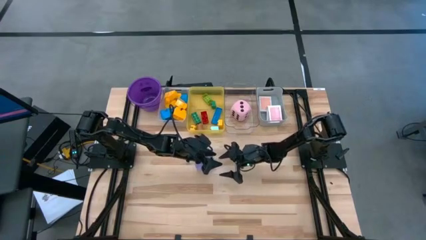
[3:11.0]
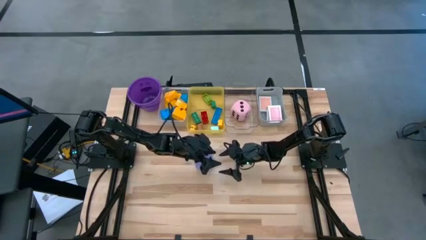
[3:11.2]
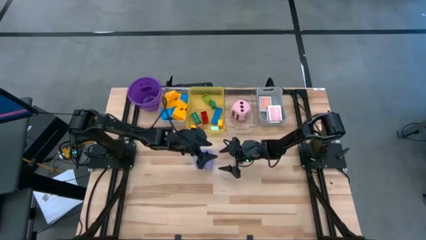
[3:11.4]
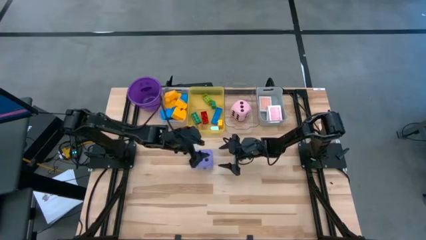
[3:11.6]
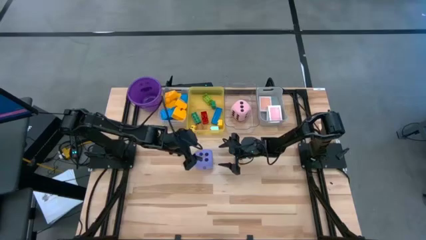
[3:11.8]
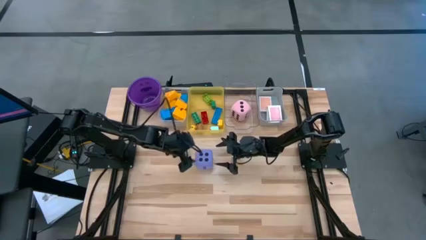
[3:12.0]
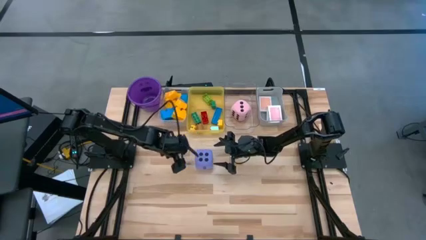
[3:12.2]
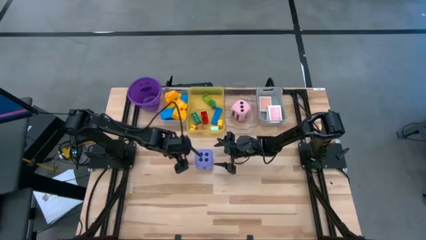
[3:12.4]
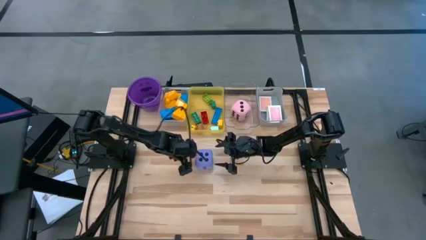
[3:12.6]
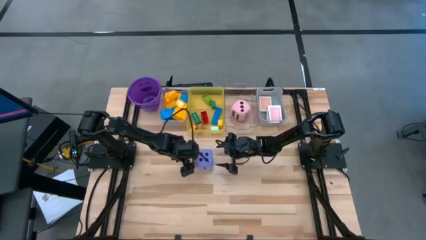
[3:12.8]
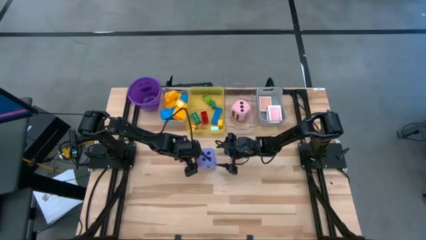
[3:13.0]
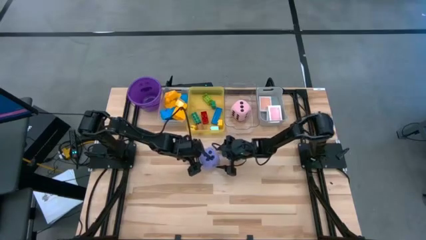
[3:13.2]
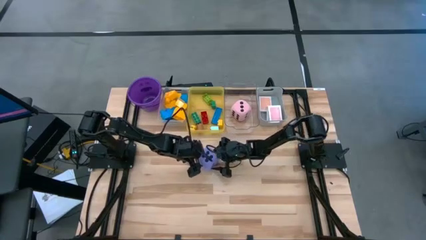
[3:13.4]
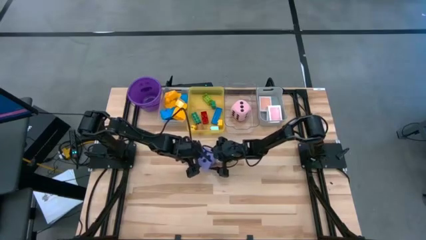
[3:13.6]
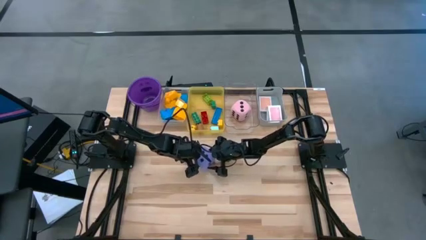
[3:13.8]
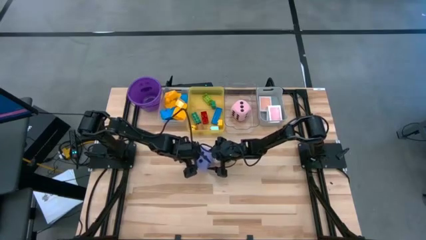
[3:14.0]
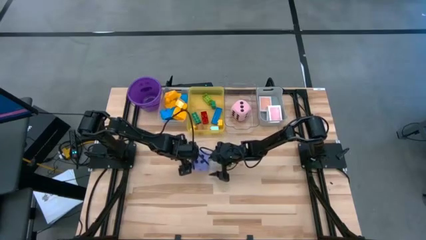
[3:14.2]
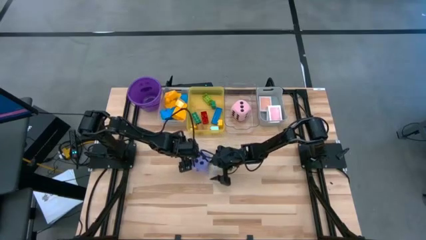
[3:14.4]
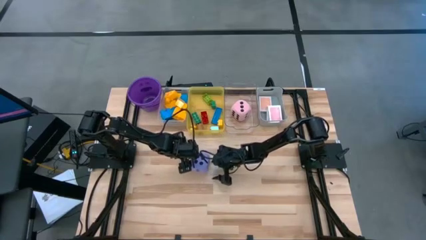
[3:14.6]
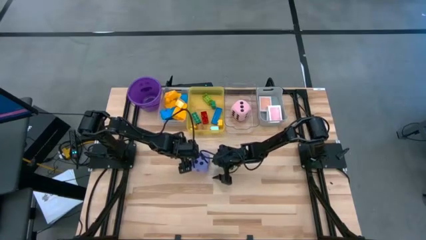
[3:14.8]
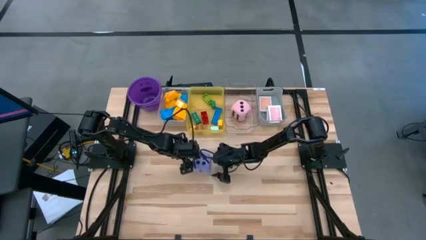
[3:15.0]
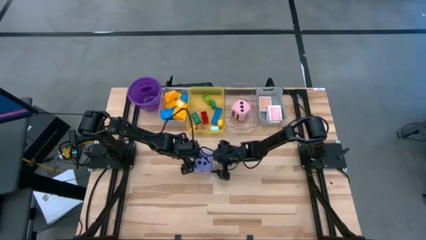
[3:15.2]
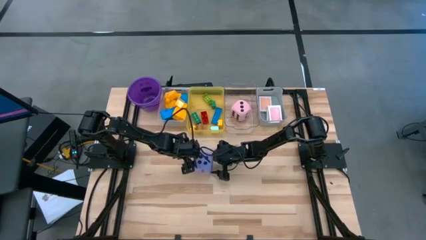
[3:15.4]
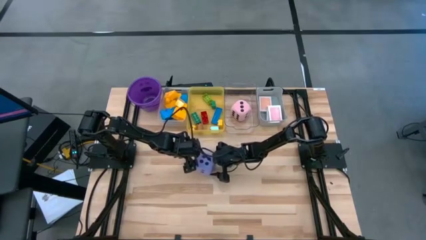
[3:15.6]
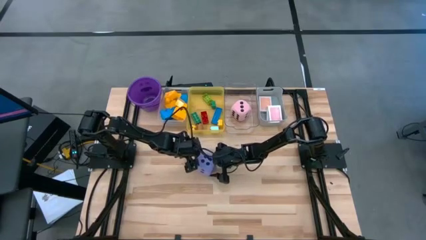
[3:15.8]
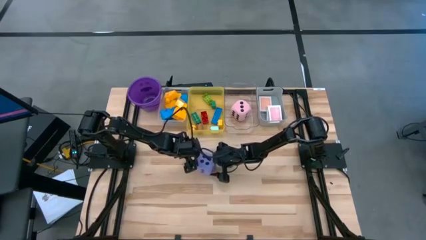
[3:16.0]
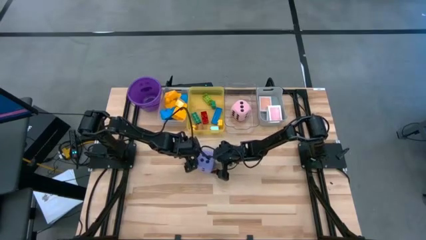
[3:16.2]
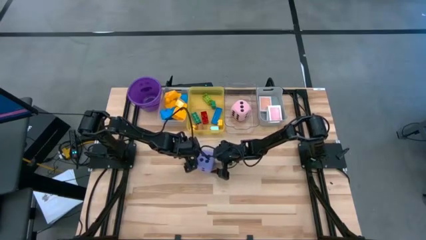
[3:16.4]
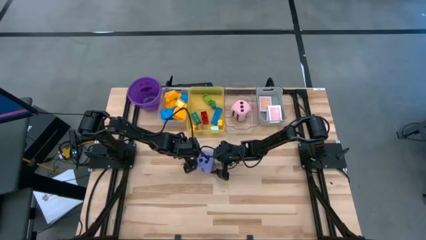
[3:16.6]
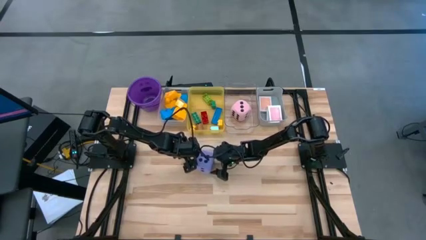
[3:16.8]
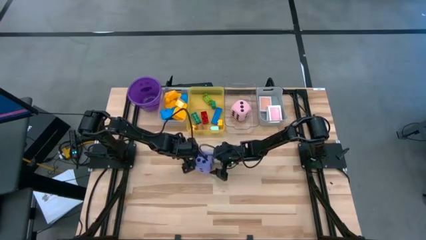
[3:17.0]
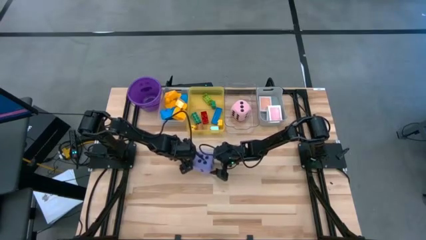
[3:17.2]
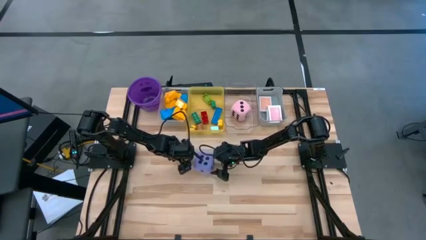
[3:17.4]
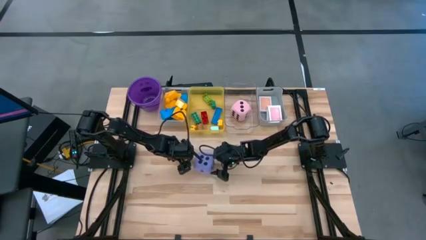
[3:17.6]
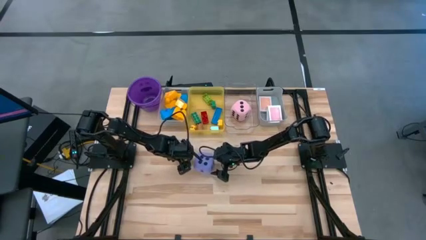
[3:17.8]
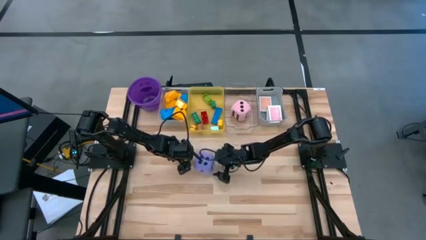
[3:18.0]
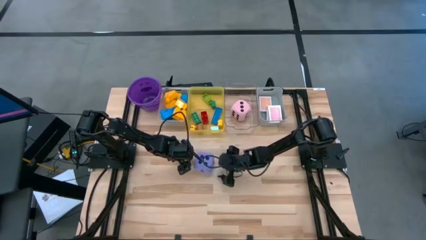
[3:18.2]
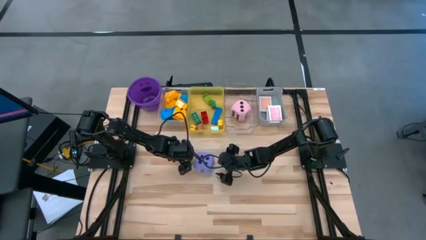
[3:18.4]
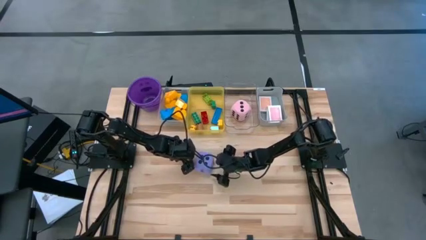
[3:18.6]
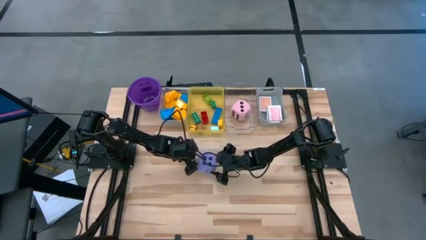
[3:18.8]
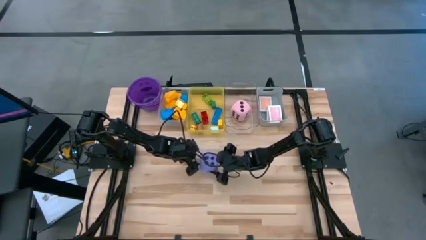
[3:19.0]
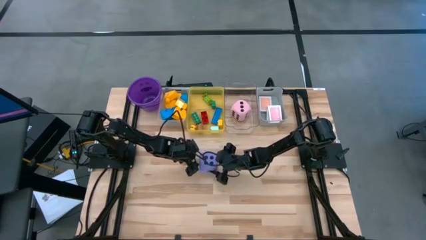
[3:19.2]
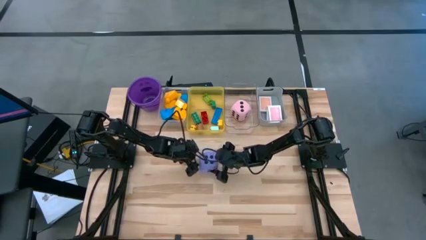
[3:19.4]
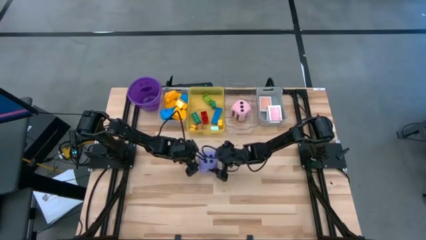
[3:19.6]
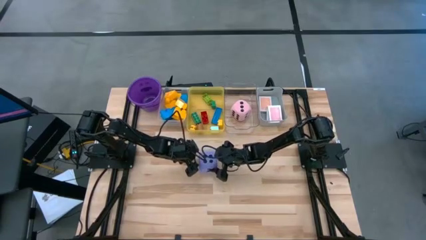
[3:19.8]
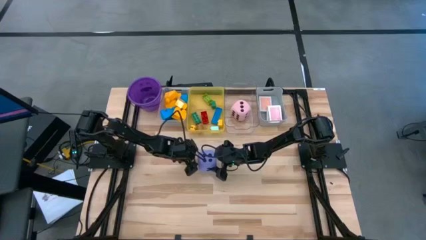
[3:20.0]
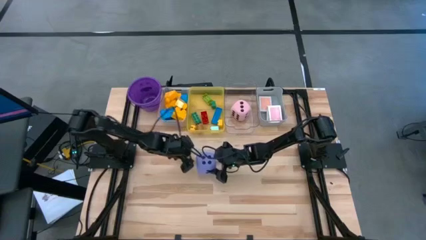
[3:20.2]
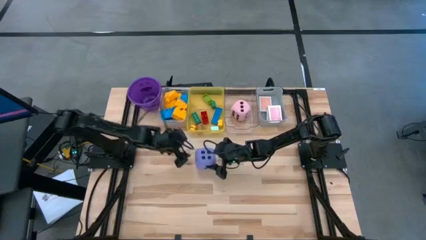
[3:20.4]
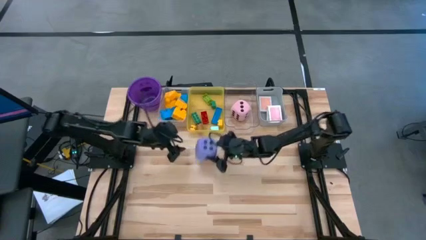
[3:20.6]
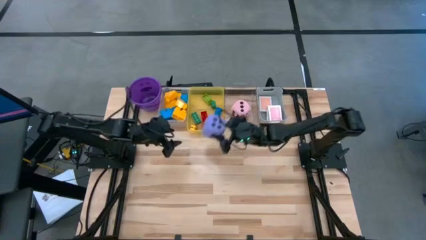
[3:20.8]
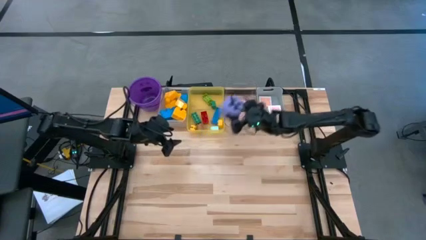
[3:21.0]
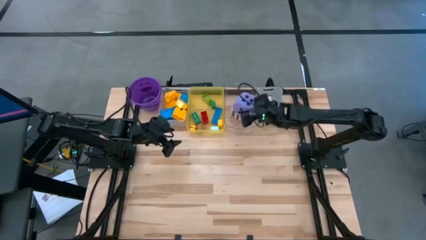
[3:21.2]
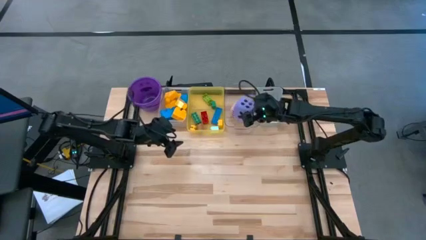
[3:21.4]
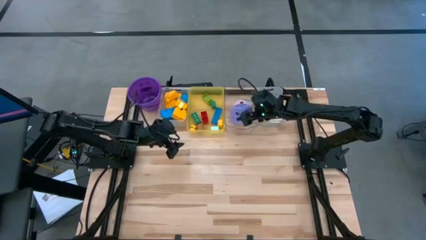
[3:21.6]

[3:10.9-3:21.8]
Task: Pick & Place Toys
Put the purple dice into the right transparent bin

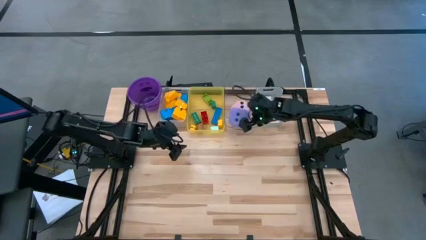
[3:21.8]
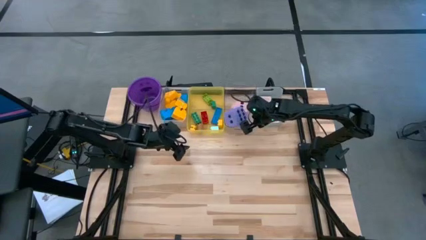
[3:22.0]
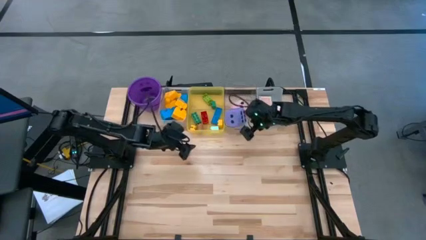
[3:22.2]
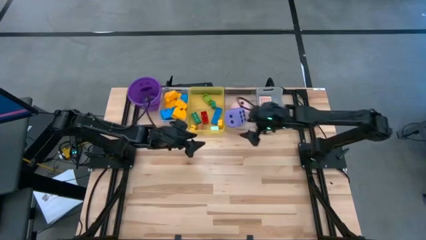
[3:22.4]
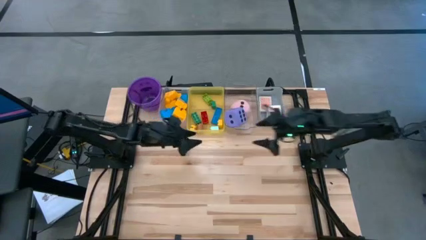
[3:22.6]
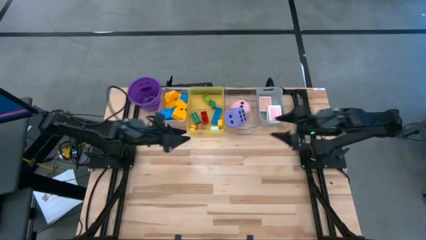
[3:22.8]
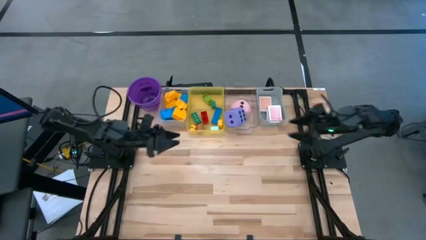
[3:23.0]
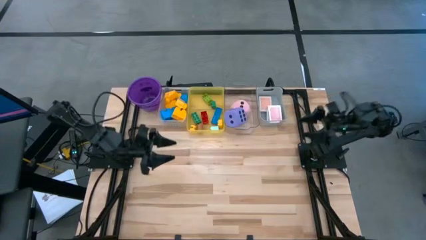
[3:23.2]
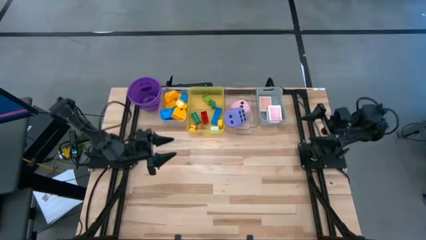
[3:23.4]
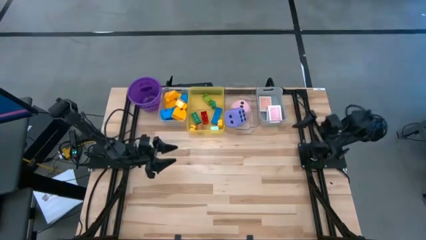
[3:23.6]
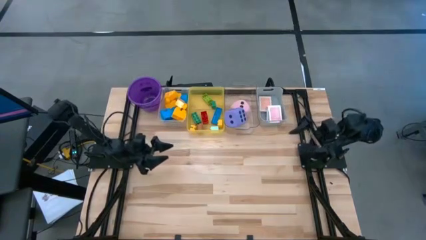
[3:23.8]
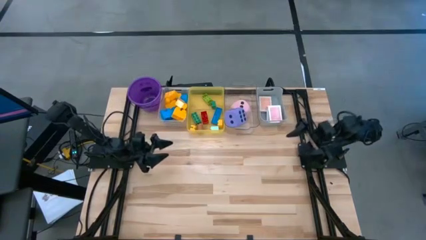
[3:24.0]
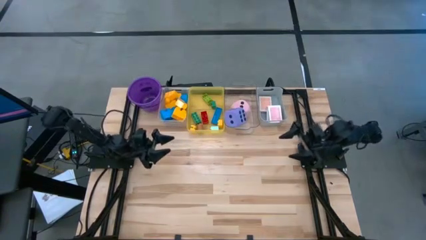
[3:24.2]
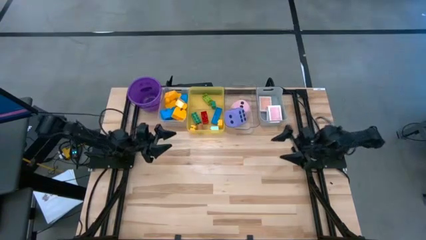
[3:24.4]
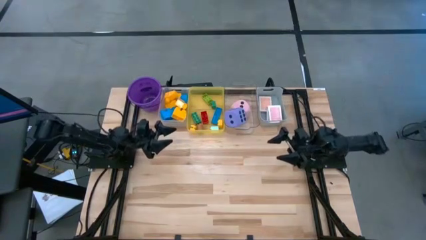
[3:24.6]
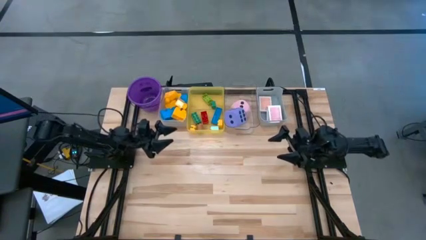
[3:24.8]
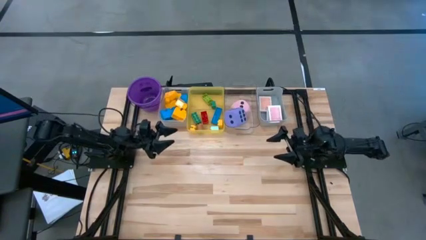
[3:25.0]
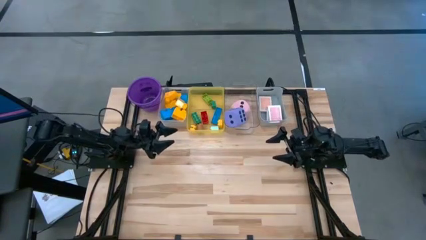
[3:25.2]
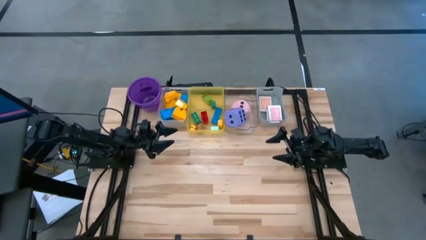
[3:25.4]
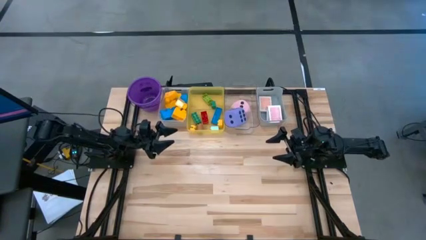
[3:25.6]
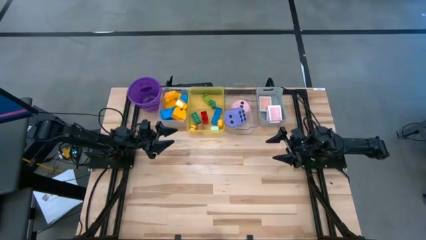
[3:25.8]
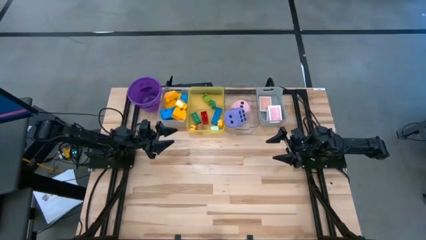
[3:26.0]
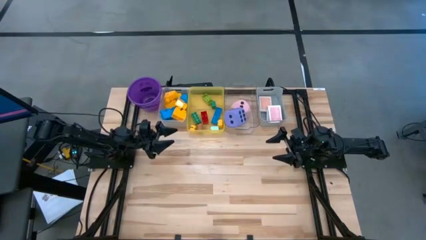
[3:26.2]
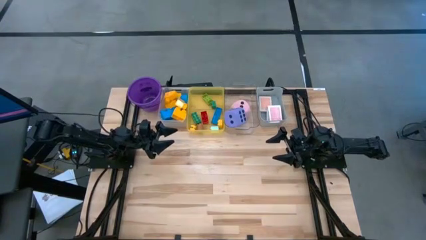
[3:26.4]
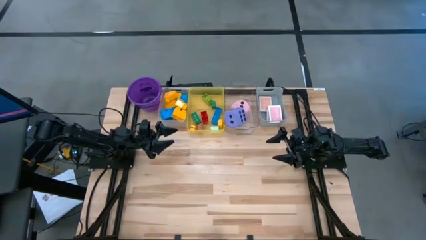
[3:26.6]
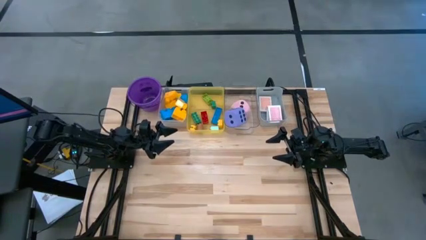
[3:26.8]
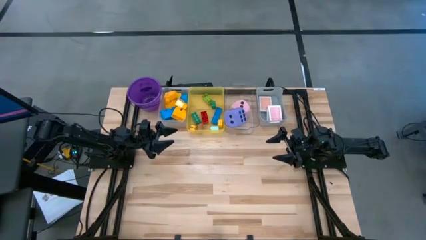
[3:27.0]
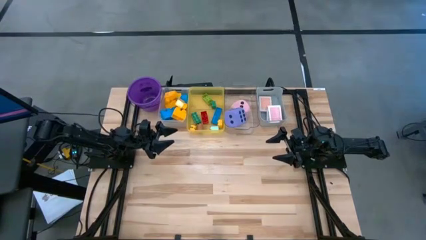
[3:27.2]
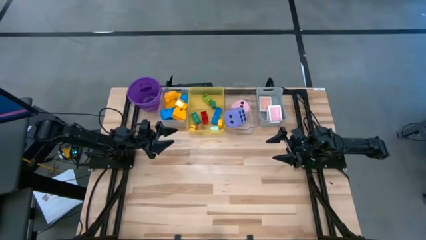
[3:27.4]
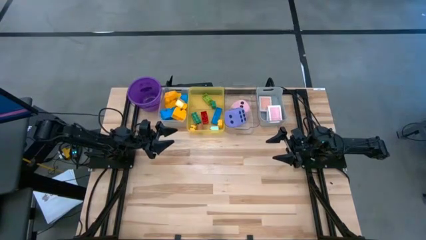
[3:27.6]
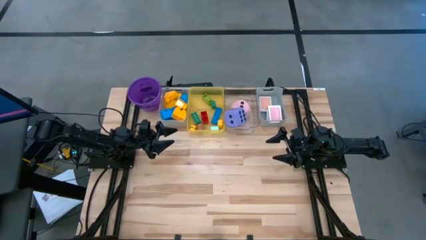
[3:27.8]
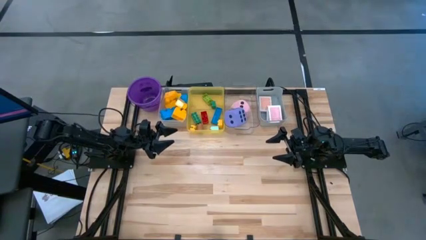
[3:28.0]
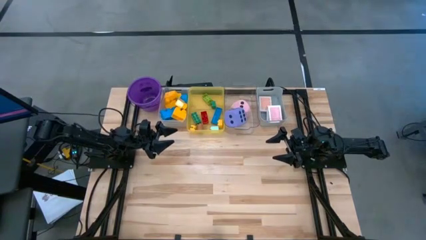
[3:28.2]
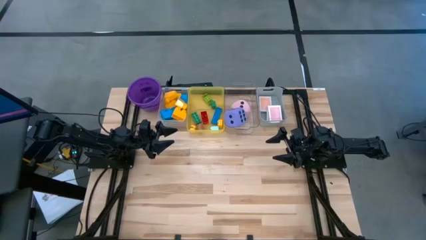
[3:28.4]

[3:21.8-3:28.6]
Return to Home Position
